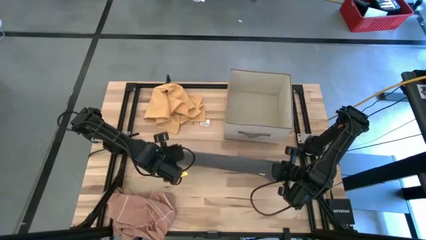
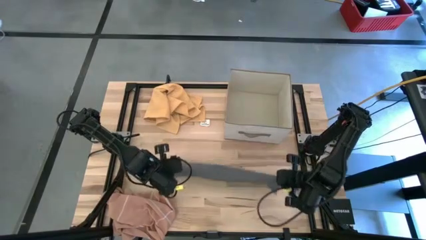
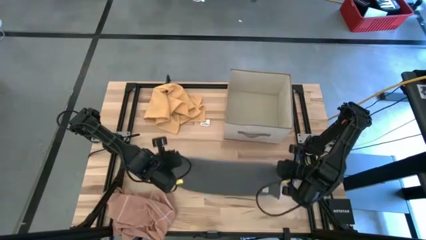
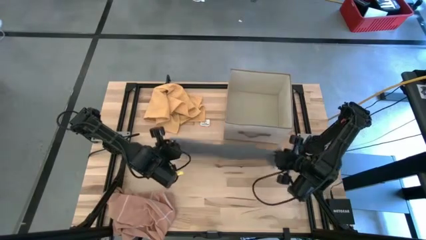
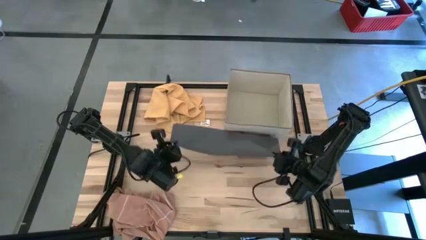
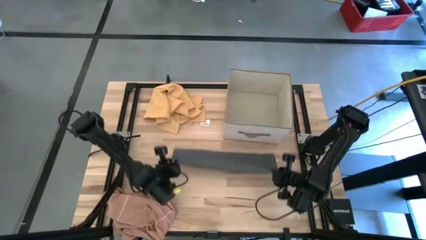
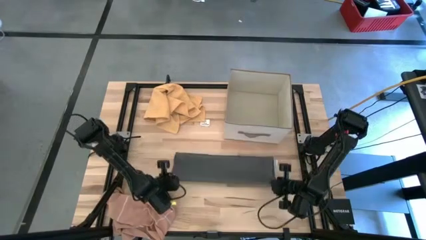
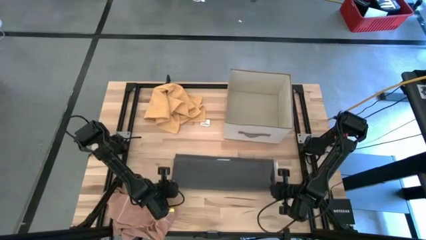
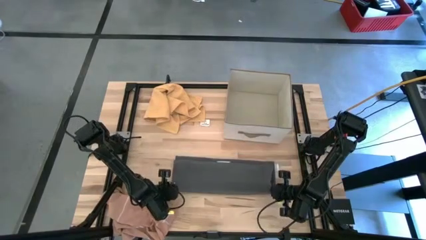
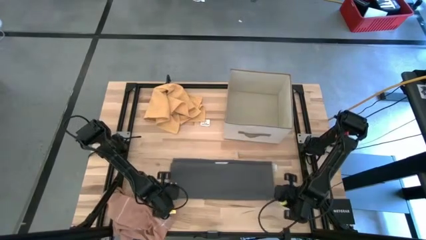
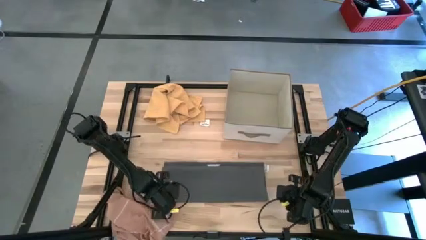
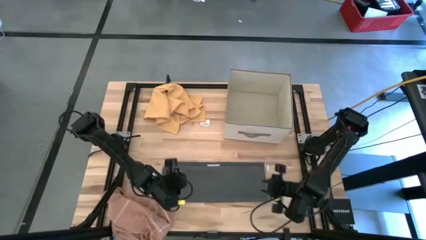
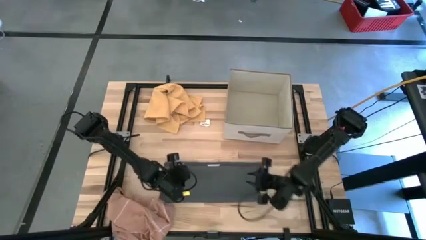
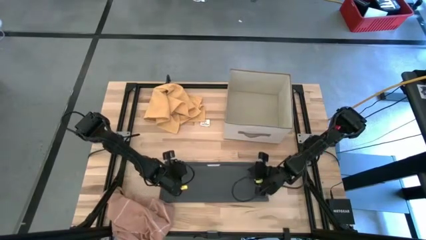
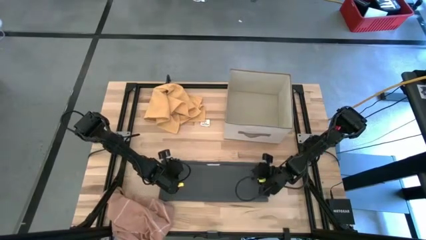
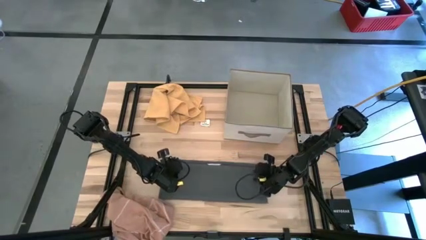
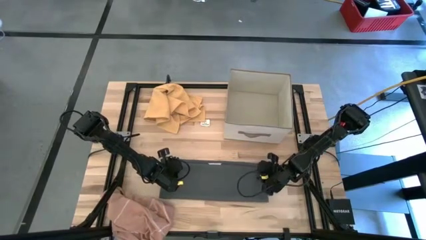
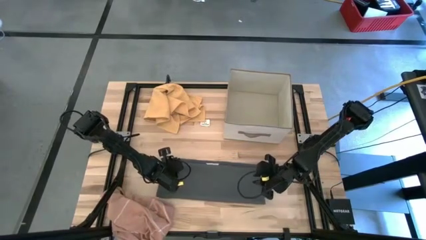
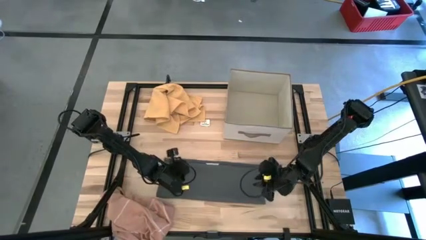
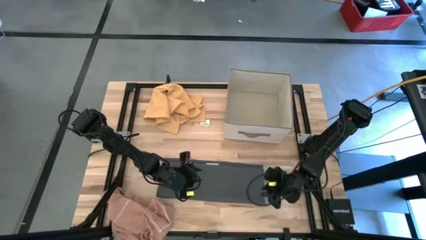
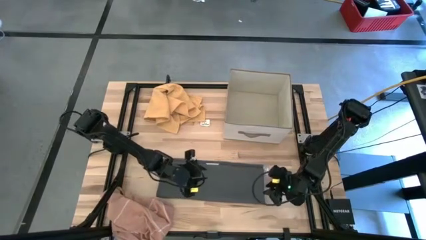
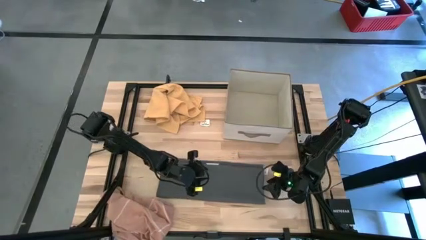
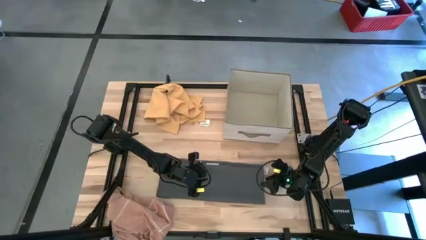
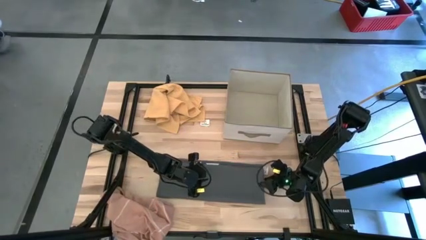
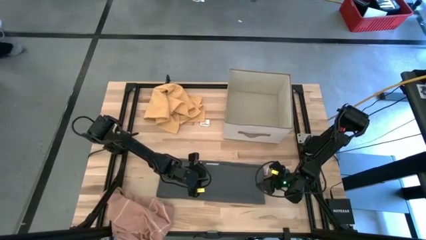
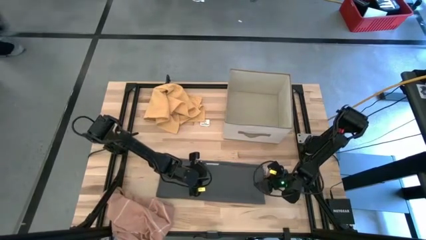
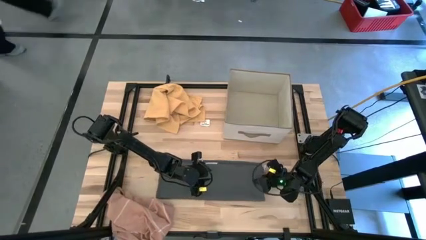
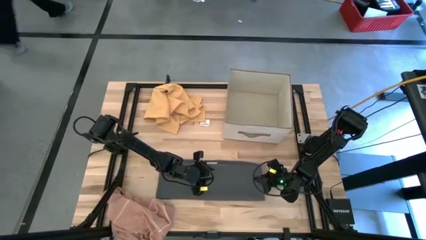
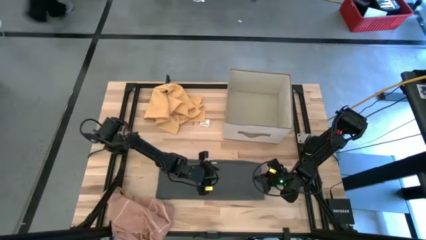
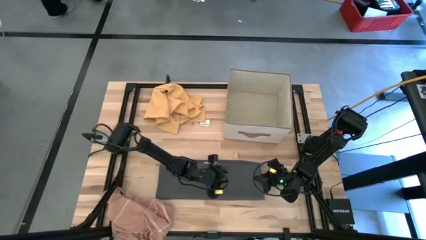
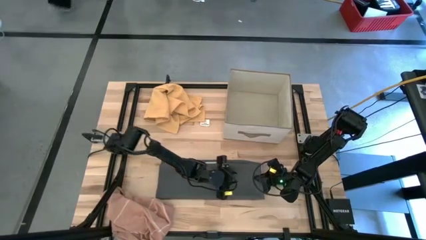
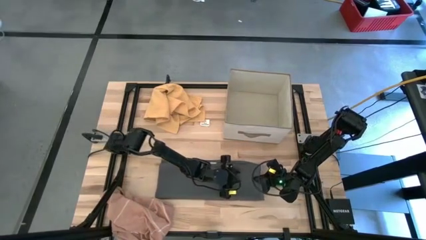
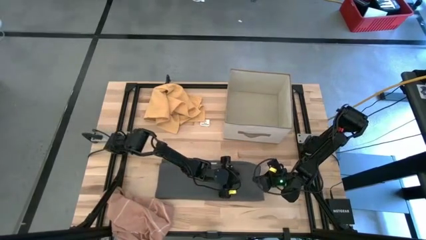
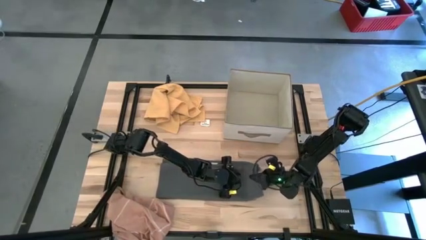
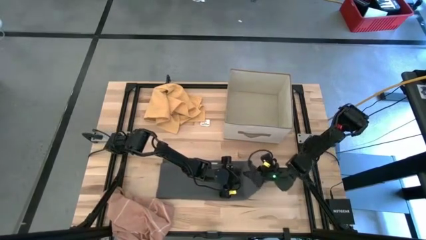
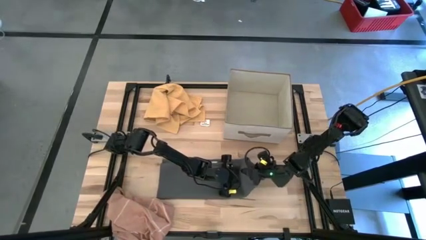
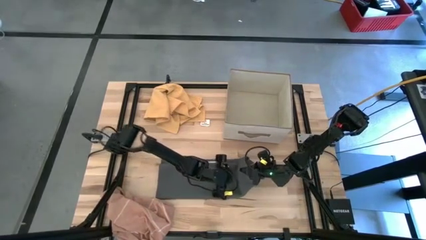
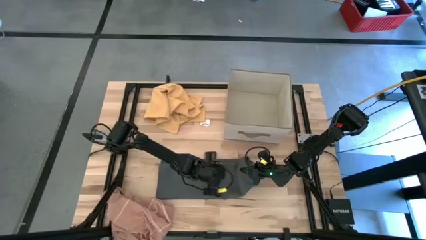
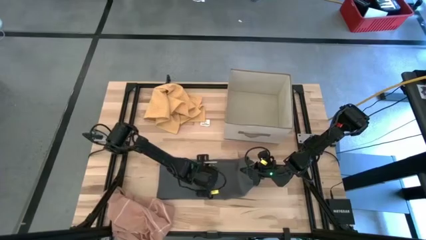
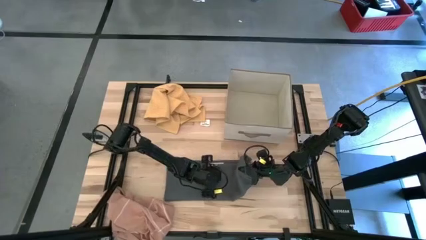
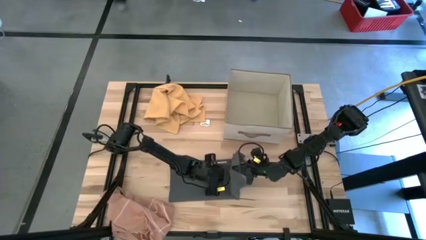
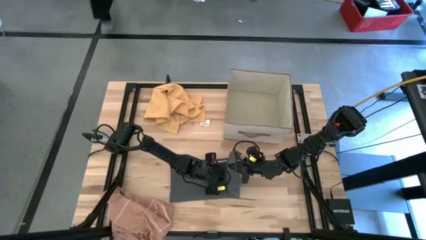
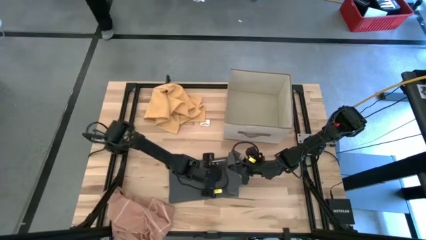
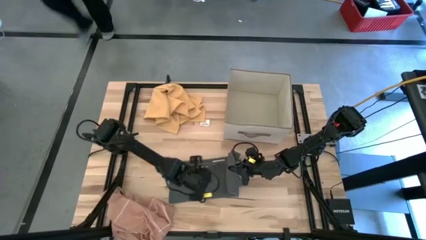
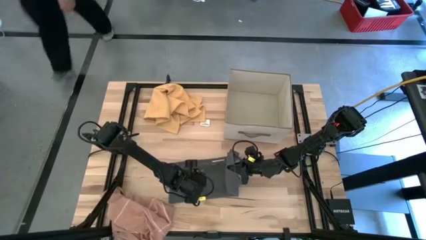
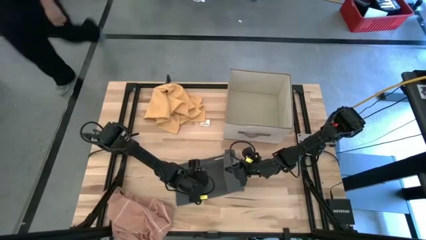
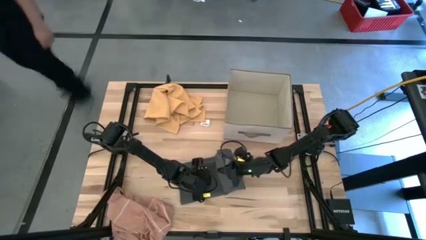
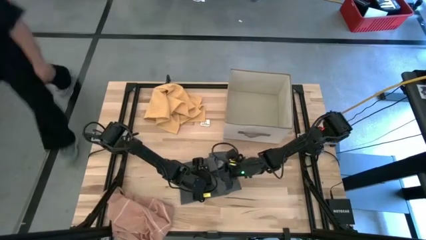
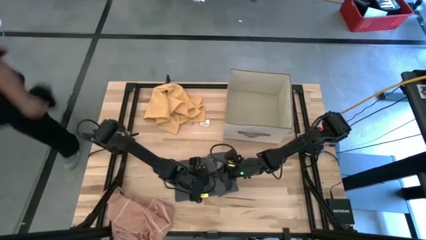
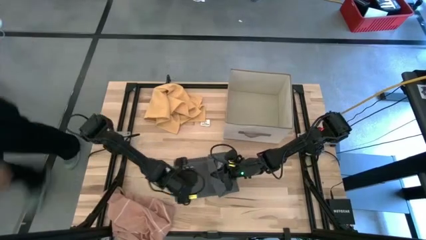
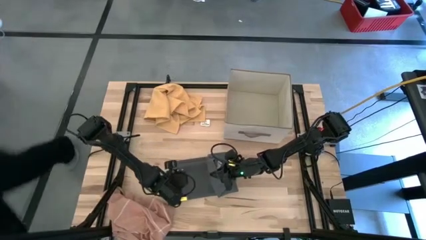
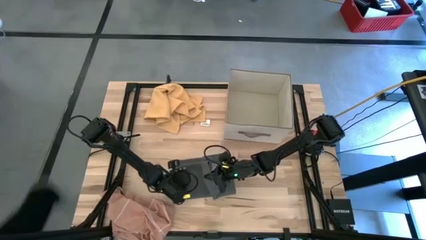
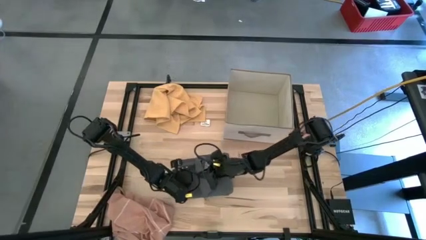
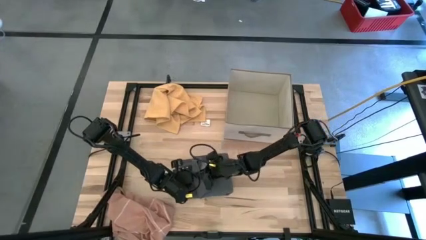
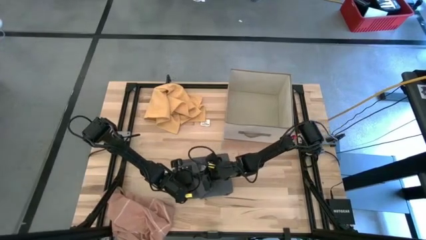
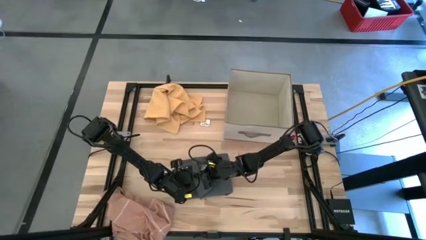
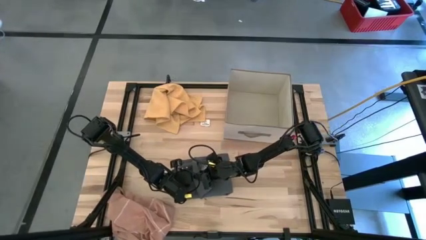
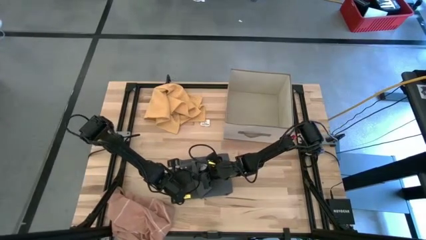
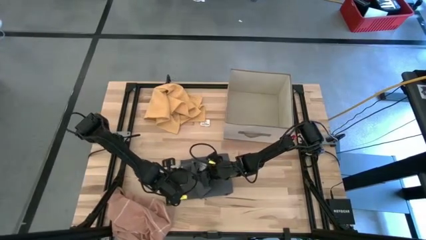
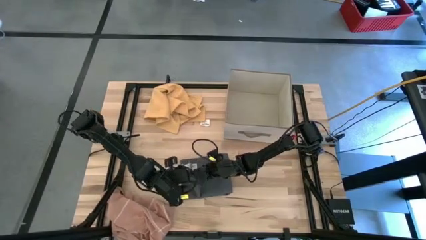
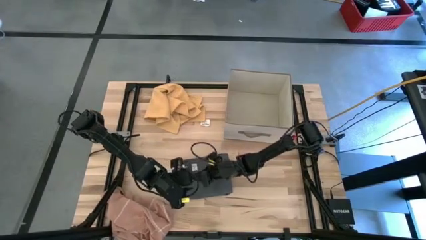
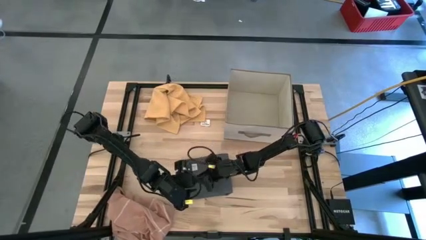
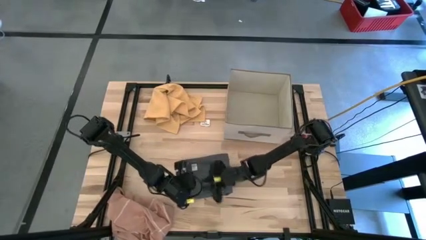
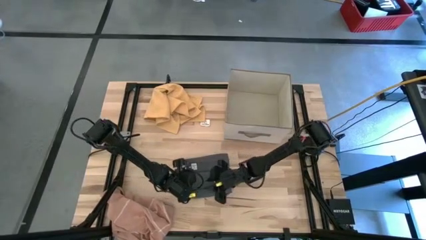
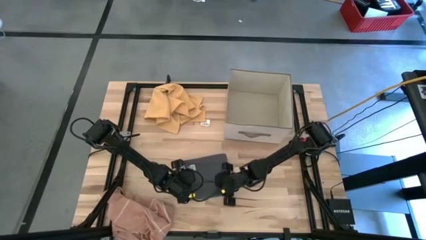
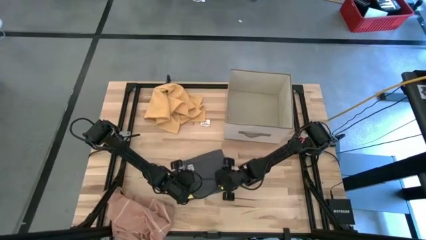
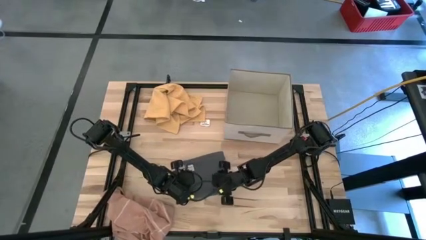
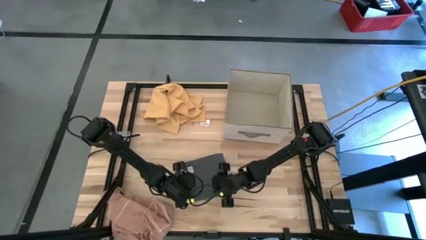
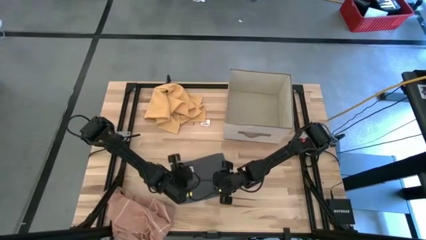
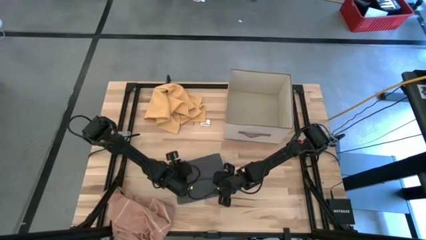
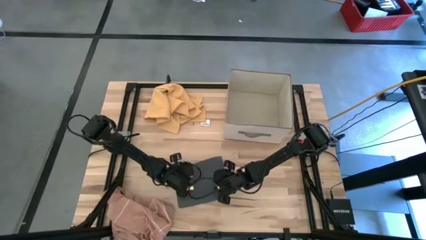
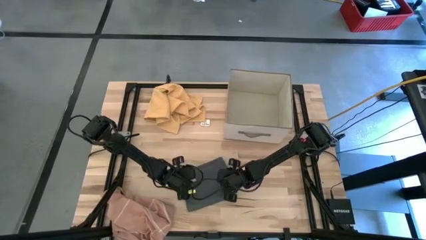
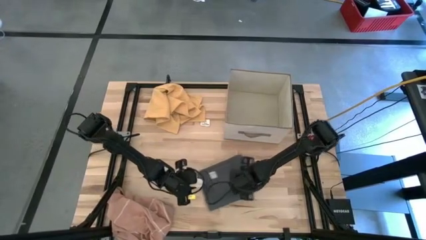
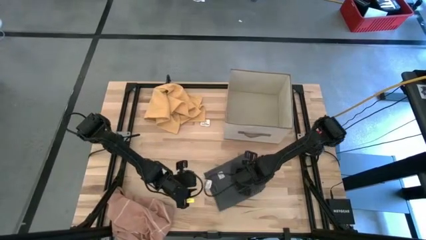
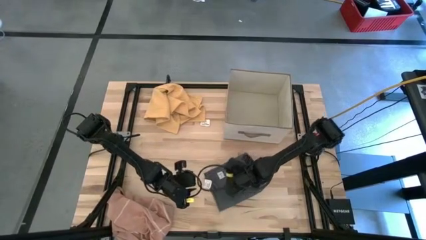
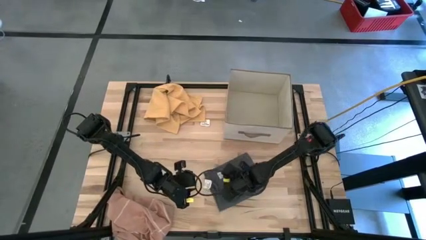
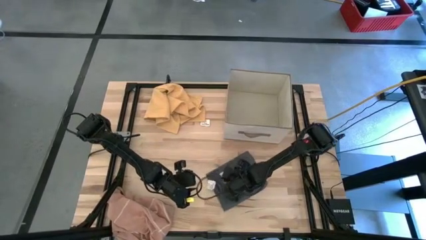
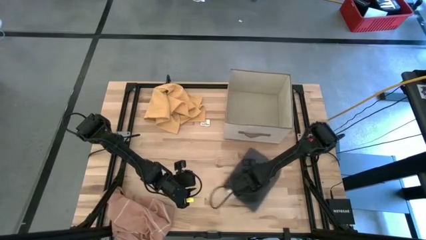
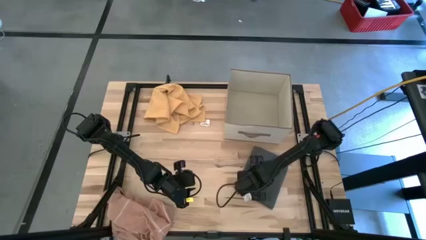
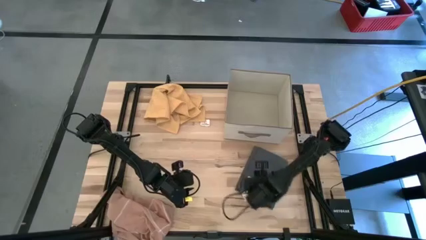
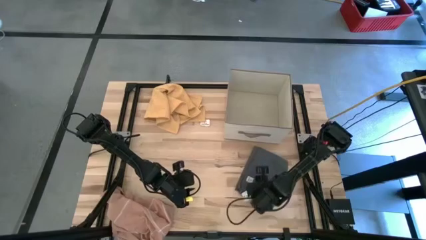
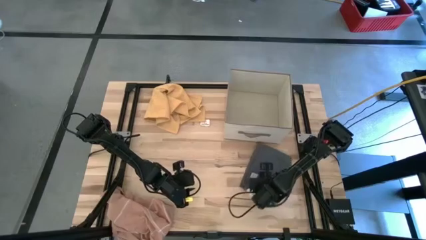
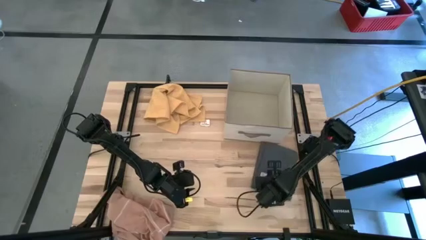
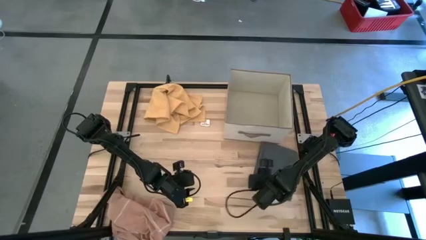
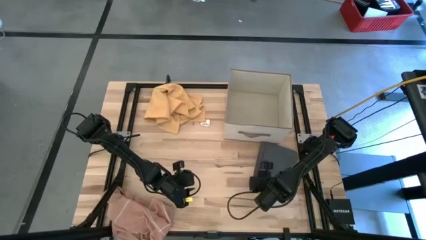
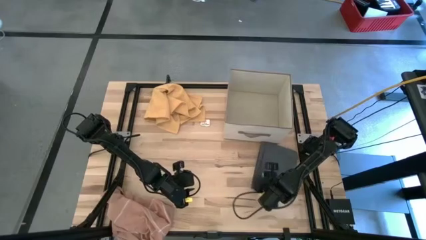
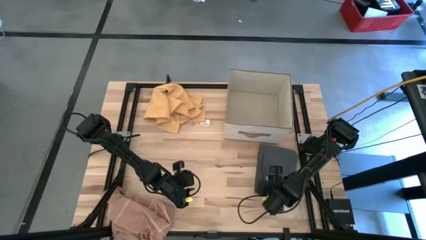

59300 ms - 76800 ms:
Task: Fold towel
Fold the gray towel
